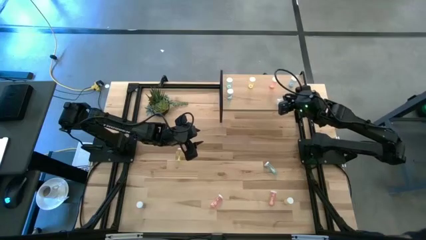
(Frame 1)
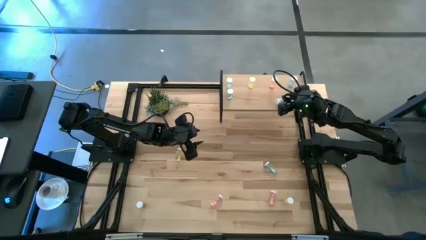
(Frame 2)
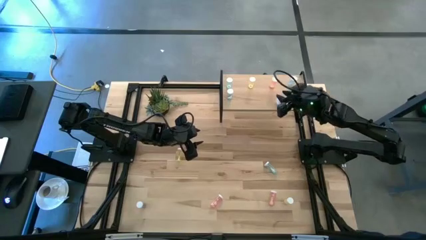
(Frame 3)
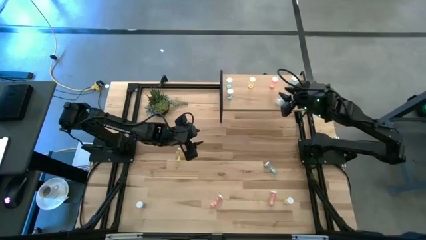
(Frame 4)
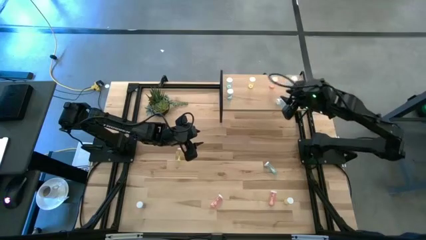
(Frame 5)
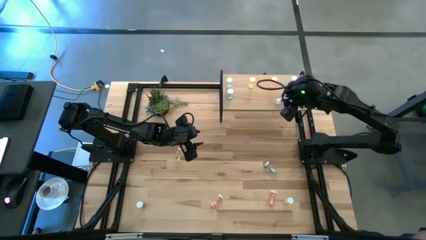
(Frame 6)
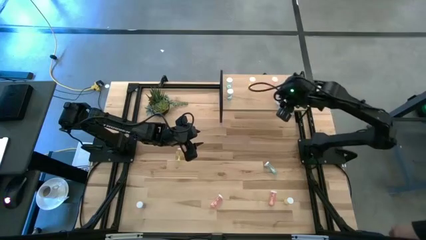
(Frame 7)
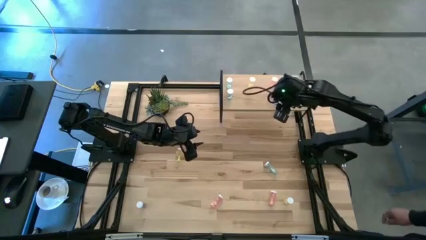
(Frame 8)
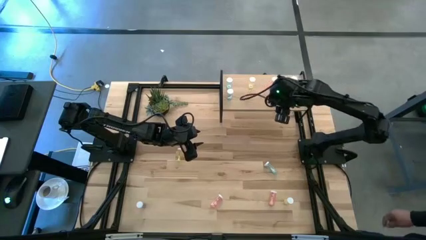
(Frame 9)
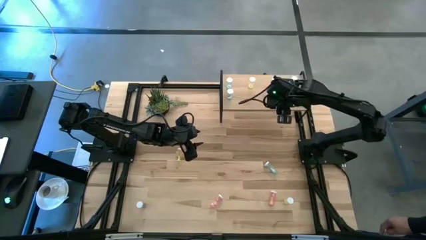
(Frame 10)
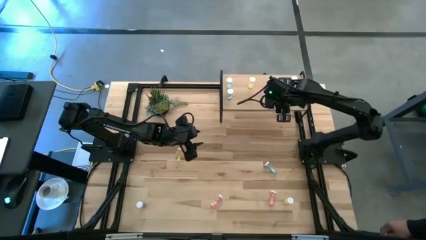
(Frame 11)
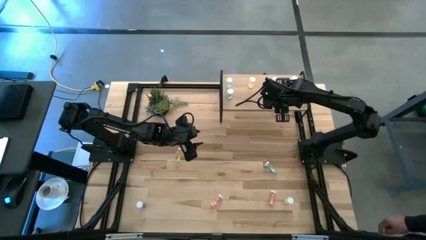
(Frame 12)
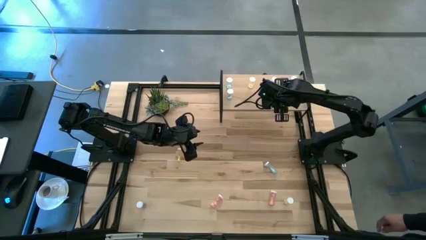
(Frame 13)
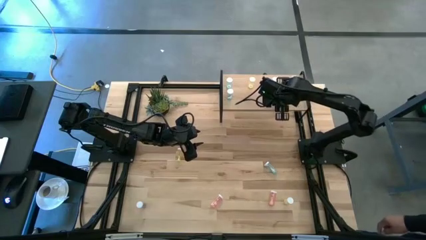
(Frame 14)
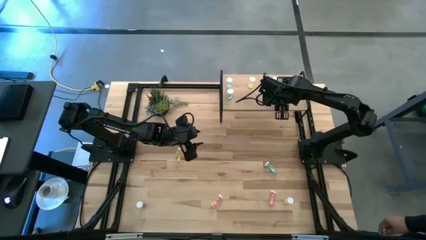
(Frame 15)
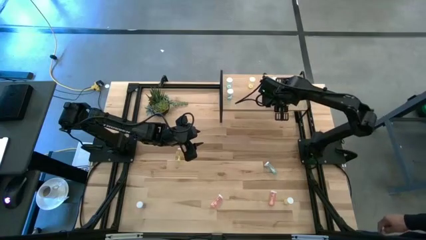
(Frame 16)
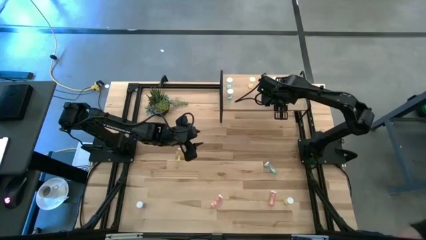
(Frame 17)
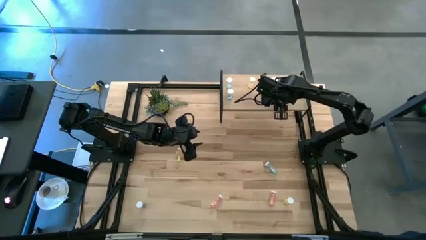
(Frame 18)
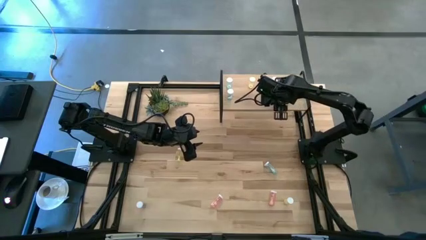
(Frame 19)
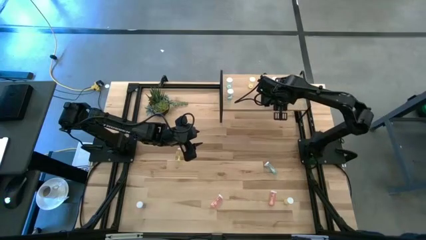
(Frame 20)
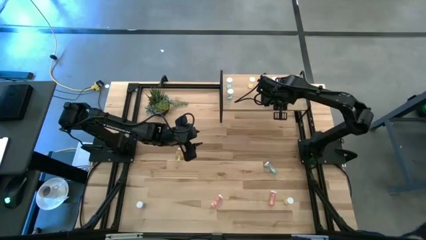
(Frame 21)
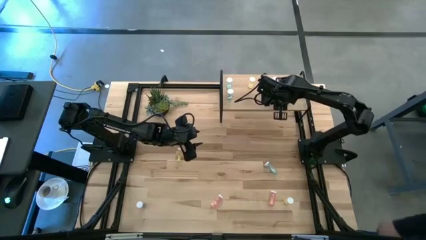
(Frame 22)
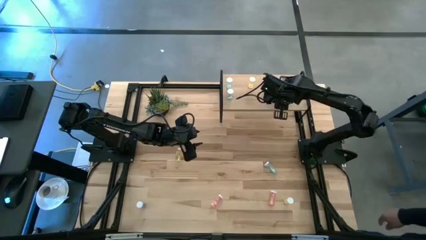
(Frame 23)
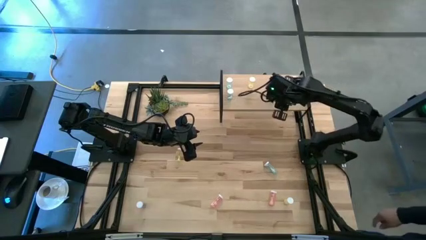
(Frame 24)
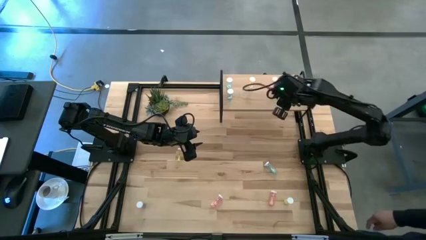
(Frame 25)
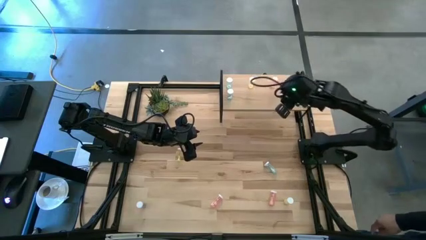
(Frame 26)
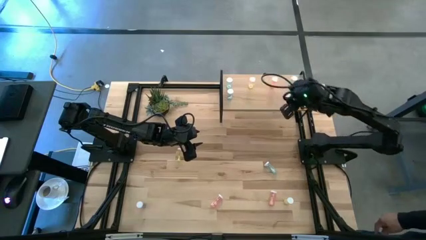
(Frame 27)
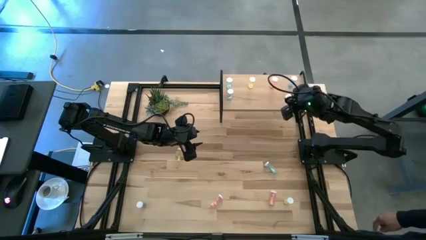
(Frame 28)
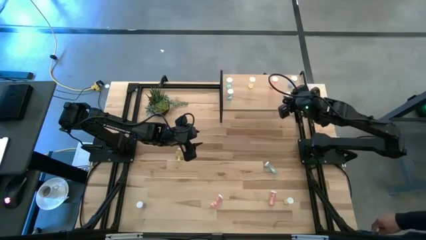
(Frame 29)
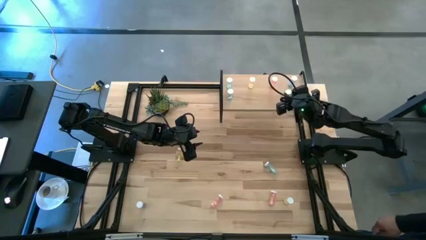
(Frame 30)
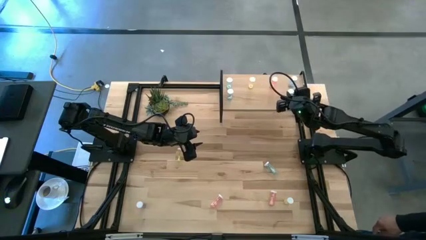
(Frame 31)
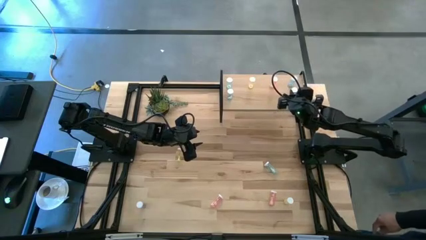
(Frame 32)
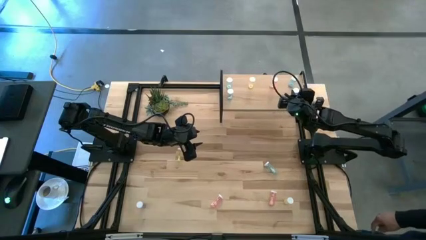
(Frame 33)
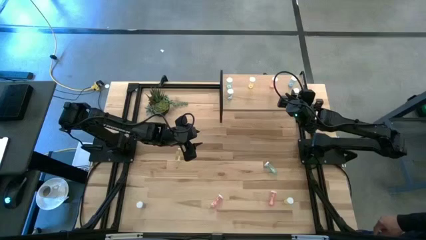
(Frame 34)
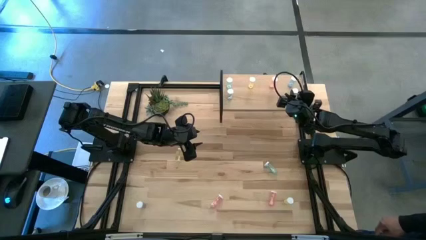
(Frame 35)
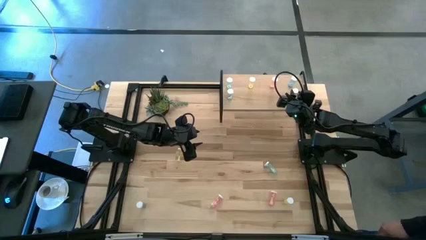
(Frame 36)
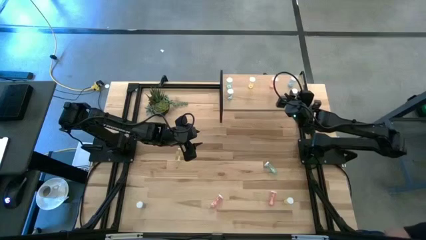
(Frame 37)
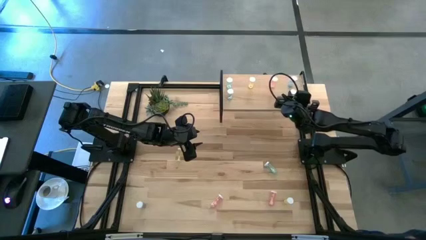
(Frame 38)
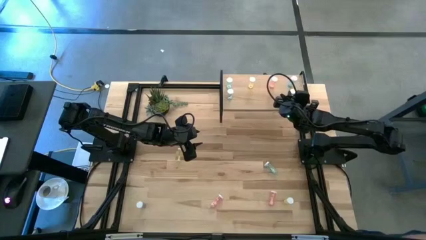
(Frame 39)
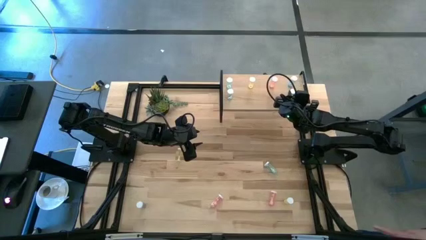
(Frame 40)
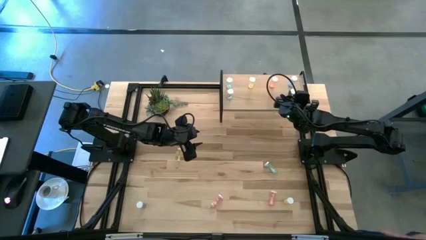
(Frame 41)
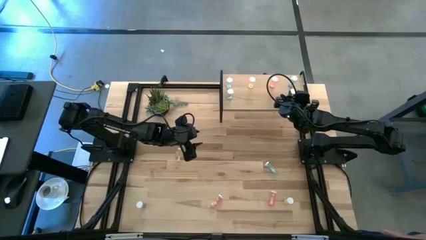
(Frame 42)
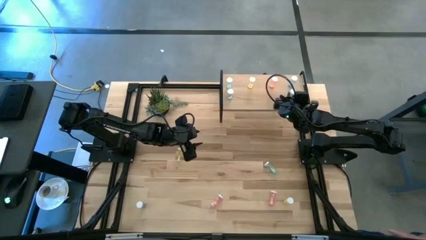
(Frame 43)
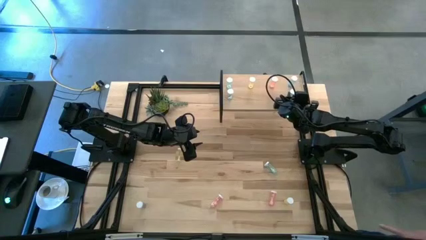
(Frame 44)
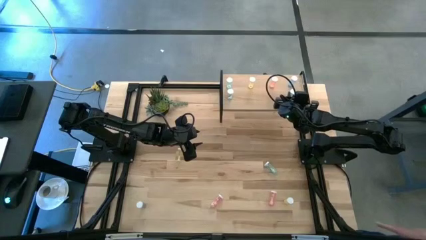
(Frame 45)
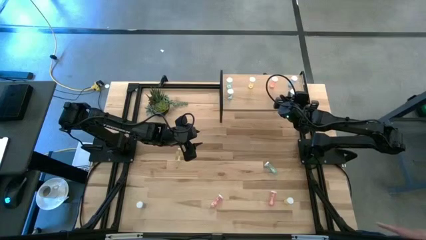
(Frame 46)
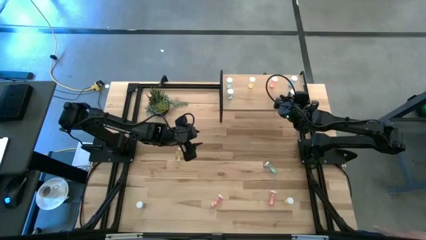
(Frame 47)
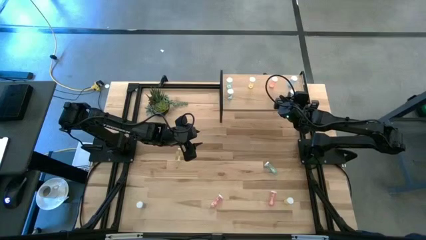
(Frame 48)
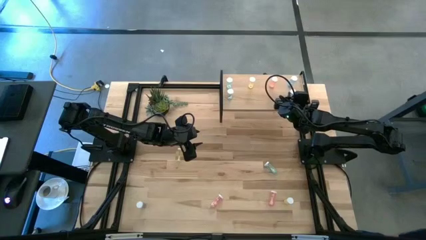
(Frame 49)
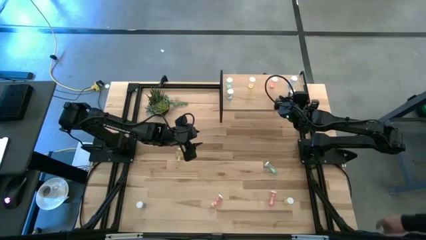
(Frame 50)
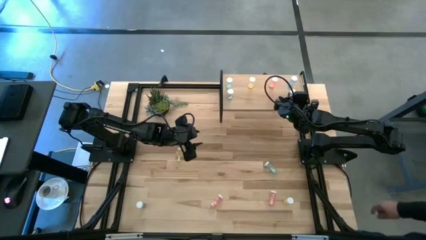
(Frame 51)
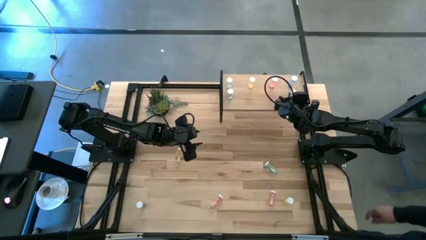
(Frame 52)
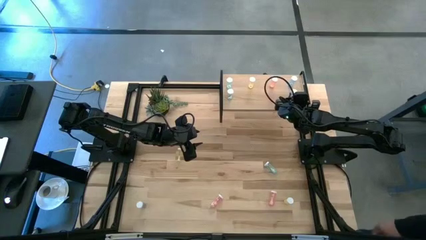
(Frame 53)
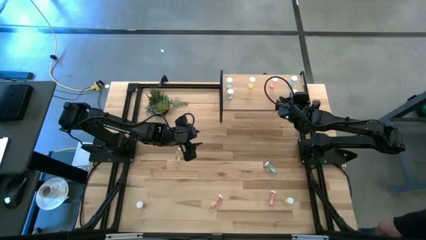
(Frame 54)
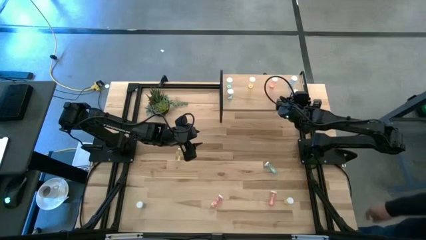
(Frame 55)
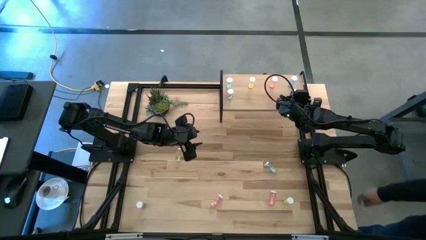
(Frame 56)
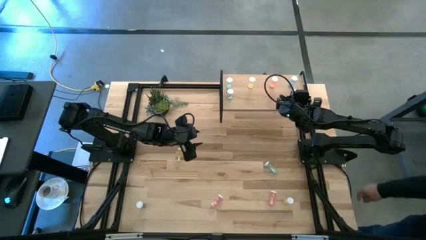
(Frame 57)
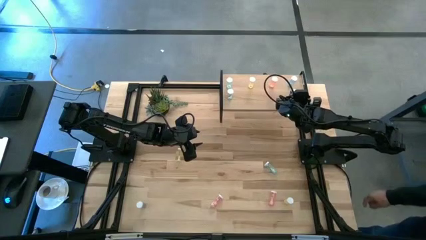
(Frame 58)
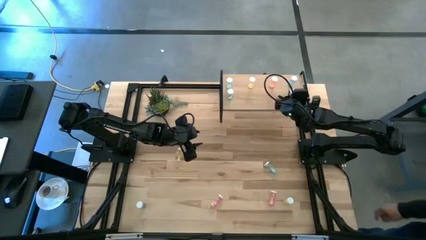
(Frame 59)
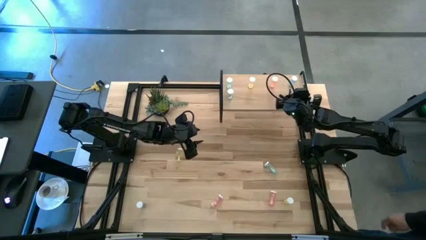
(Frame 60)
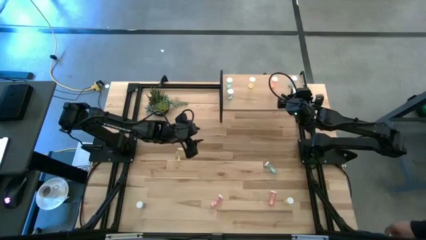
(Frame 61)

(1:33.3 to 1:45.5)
Task: Pick and place medicine bottles onto shelf by color
Put the blue pill bottle aligned with the other blue pill bottle on the shelf

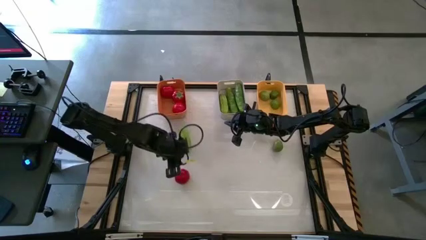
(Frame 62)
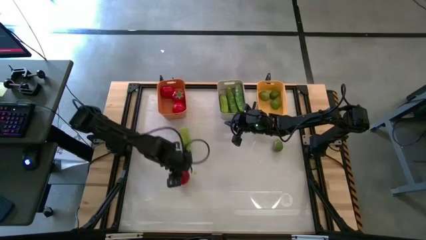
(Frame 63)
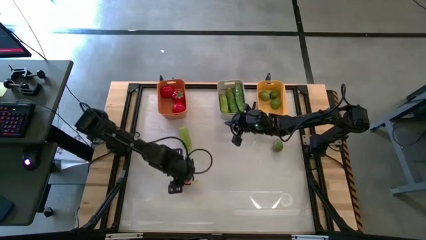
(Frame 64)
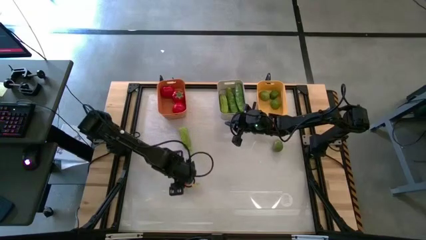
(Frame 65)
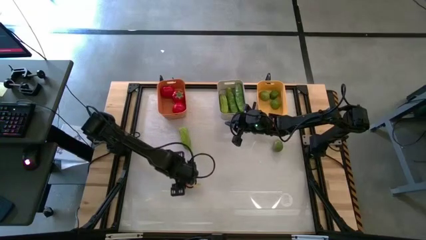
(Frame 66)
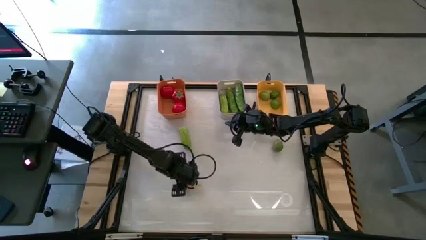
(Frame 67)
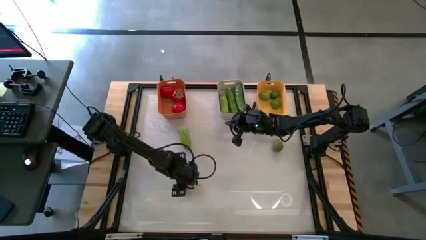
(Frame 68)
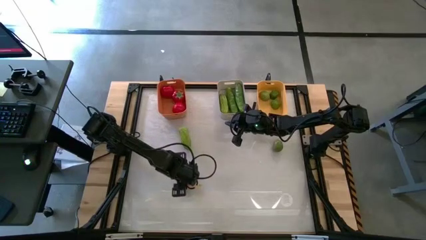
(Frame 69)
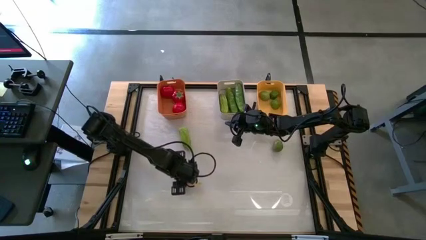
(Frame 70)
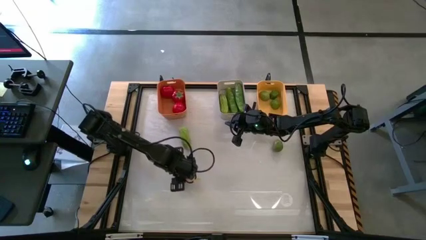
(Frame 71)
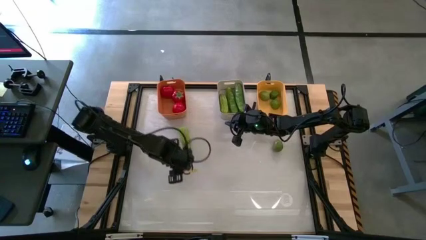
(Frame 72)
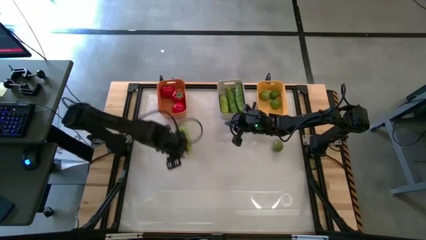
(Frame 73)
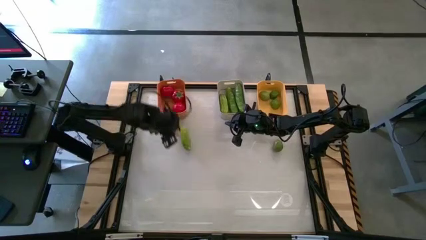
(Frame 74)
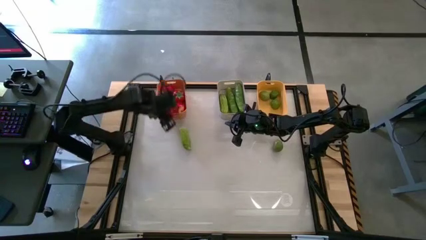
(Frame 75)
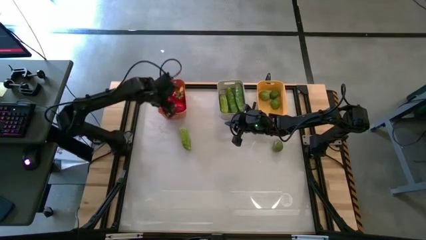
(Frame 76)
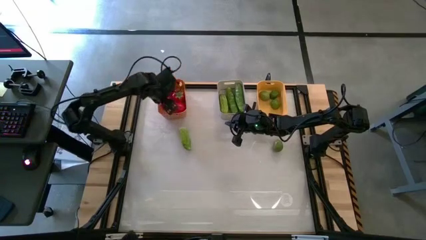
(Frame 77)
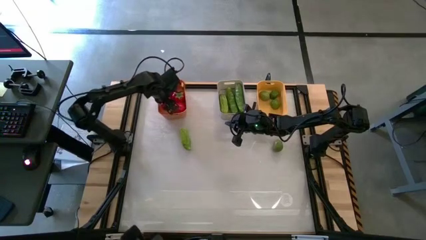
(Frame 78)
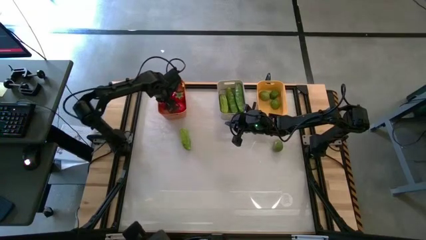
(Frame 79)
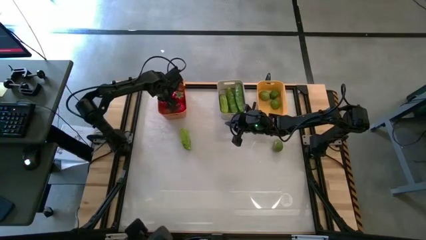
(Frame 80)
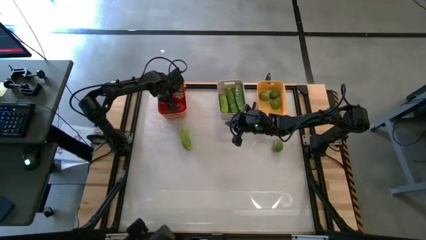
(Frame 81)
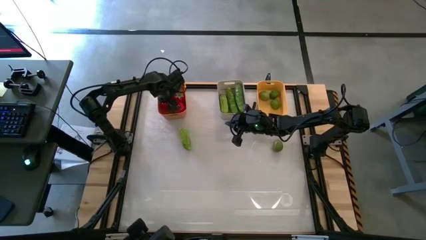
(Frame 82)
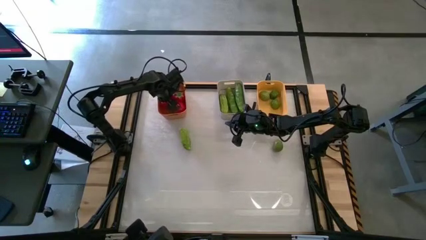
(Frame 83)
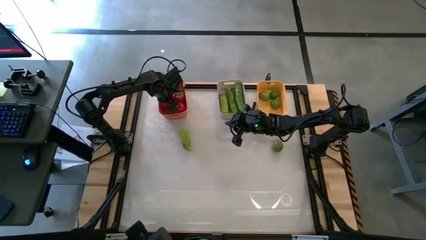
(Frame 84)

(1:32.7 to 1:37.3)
Task: Sort produce into baskets
Put the tomato into the orange bin
